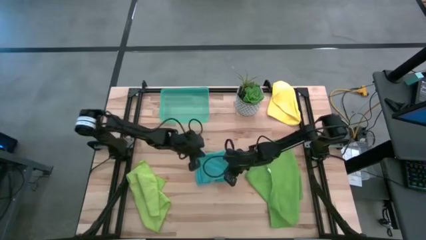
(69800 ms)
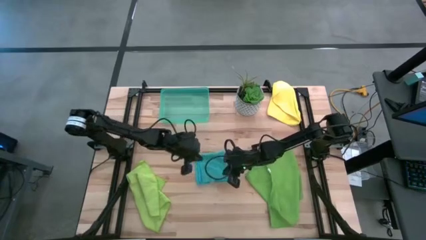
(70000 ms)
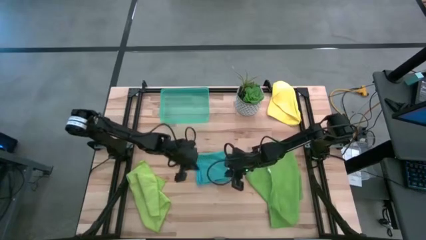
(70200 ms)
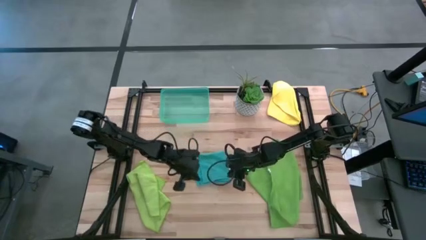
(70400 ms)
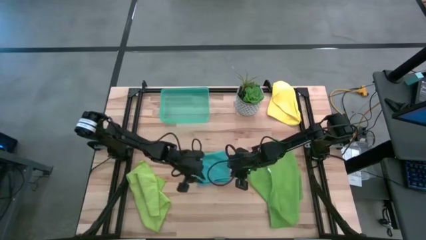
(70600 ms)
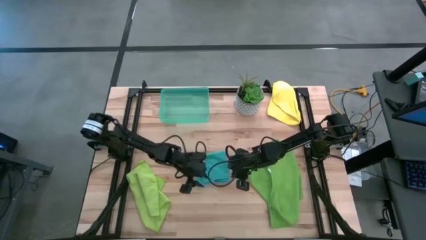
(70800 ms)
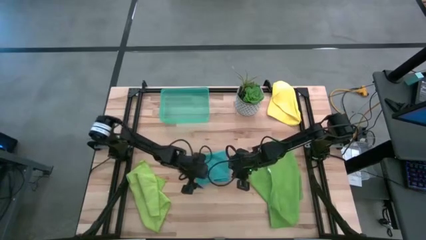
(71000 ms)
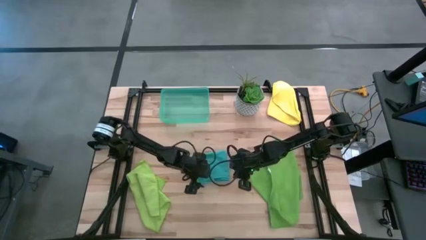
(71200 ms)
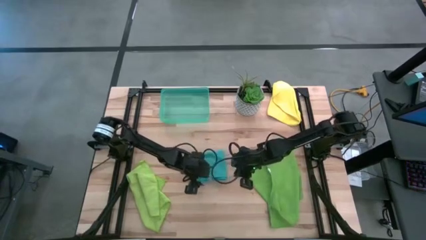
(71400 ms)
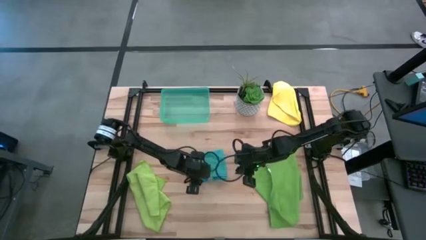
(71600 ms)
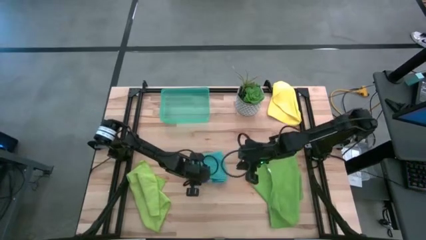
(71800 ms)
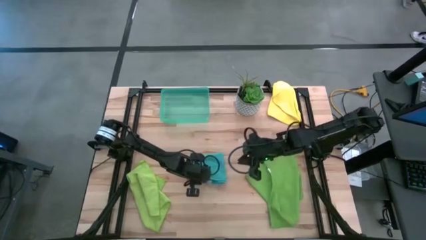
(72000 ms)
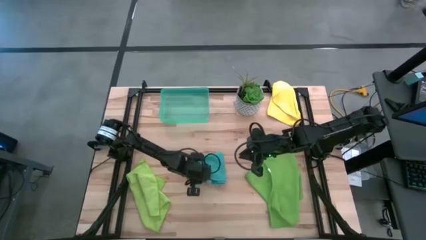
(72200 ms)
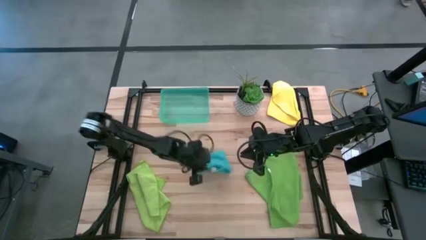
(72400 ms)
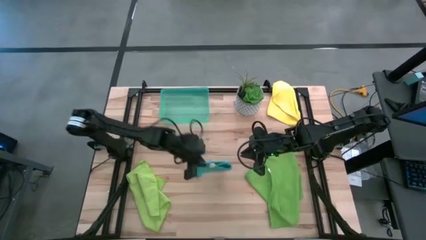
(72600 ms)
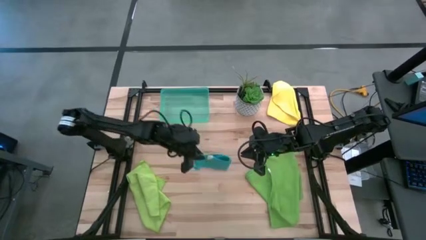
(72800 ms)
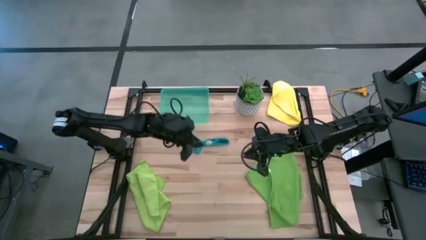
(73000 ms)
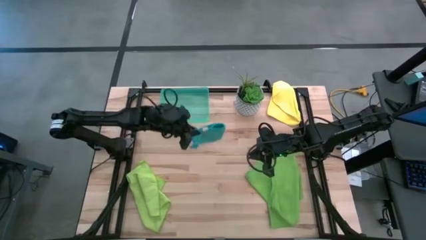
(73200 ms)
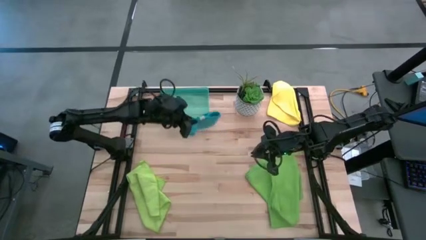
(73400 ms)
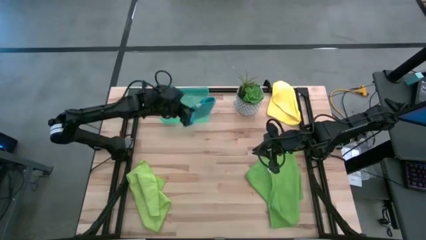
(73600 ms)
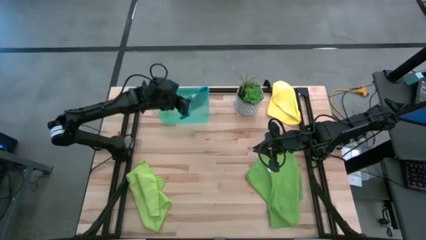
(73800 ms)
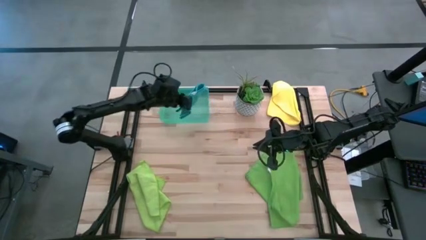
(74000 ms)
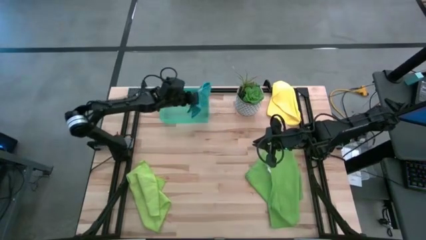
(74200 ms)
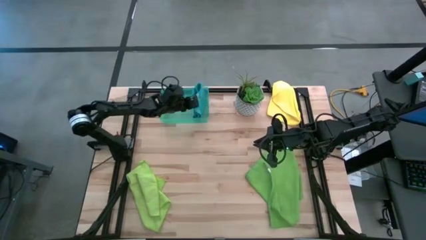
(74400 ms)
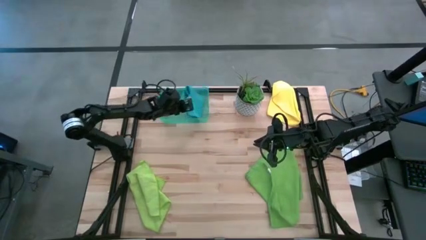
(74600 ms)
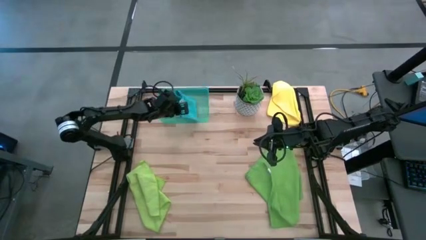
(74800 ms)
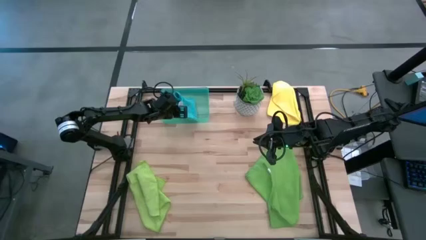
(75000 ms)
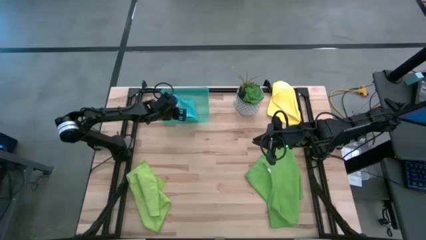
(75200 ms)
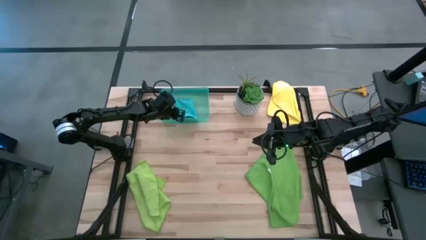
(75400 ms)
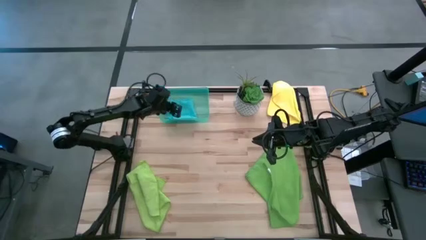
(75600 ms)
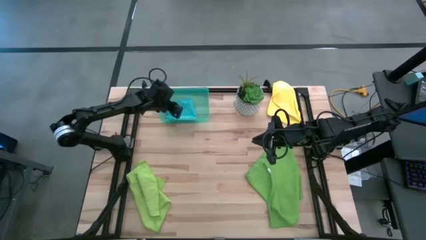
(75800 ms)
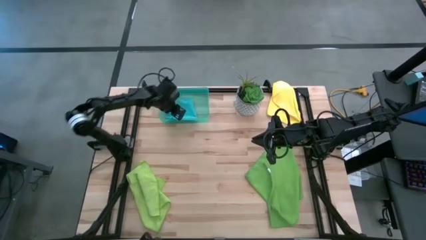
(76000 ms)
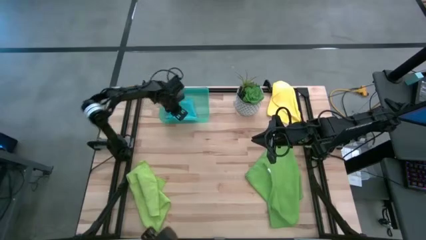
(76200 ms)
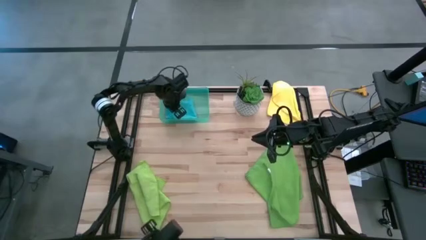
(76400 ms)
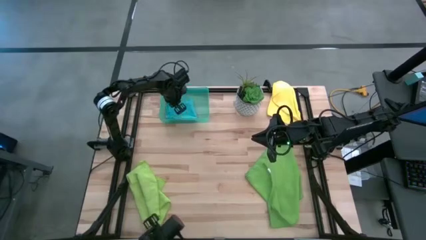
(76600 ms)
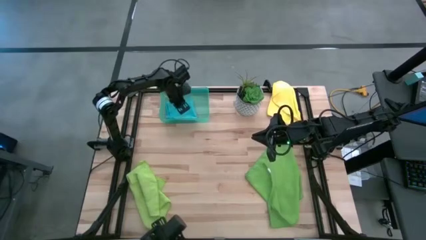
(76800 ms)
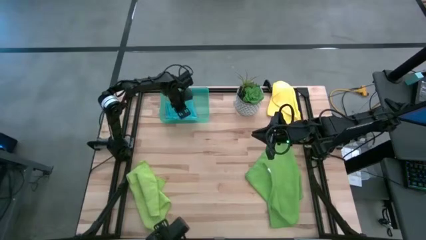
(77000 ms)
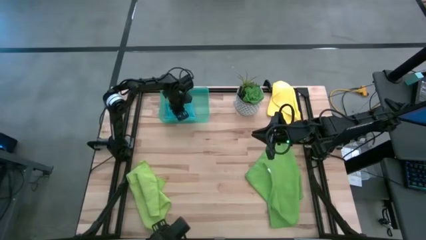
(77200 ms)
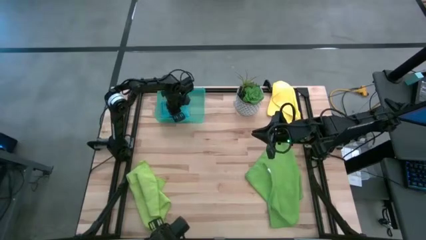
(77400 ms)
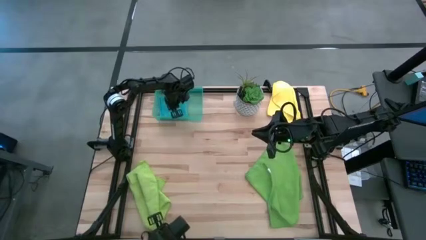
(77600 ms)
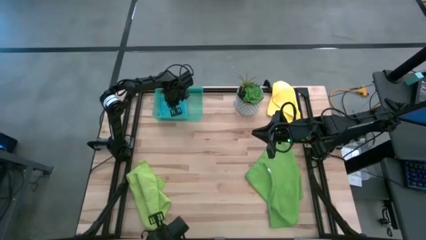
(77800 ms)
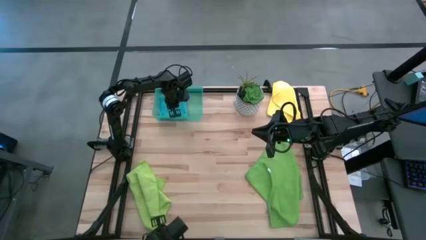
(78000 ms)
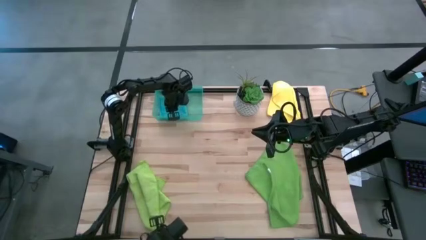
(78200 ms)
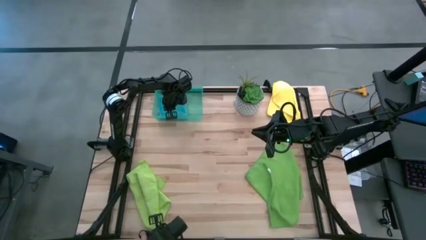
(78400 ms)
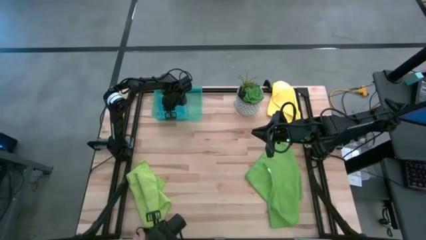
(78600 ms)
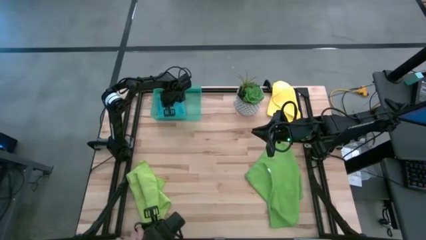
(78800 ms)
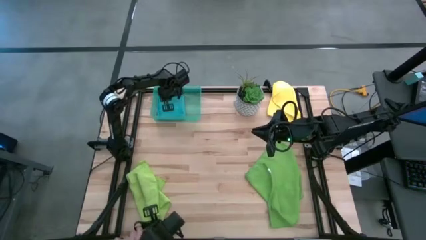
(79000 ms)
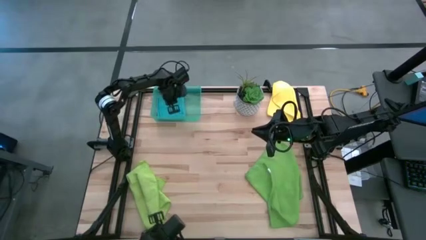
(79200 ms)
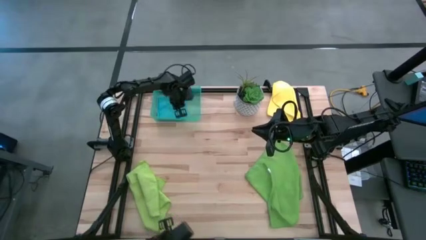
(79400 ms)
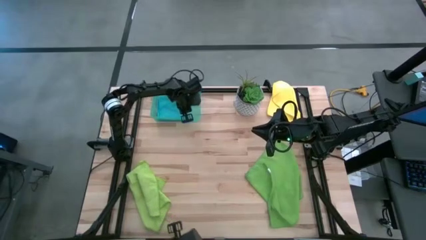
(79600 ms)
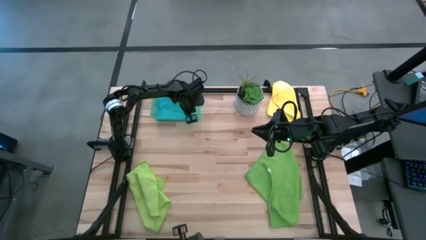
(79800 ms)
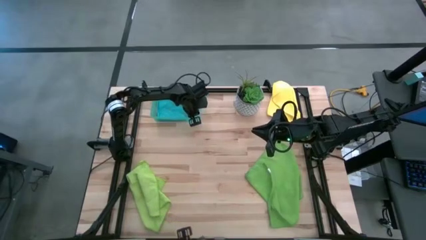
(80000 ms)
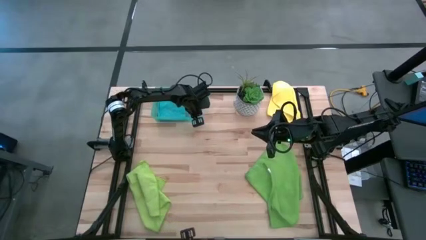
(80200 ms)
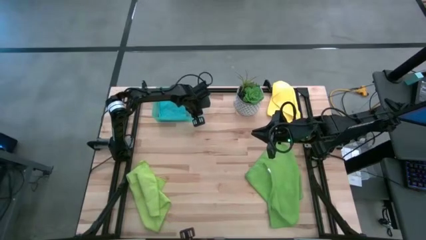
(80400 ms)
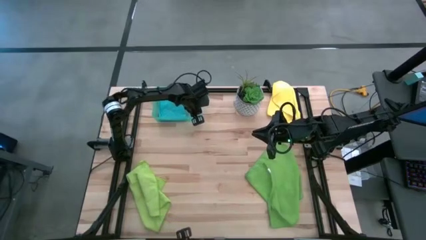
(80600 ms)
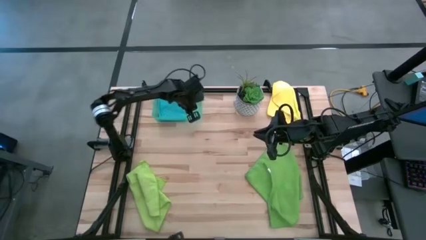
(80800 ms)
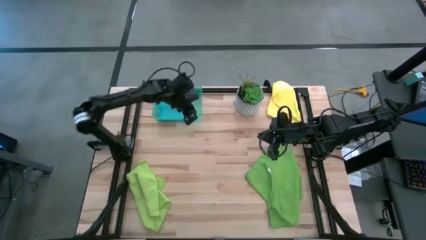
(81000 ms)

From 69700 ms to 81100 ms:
Task: Fold microfiber towels
Put the blue microfiber cloth into the blue bin

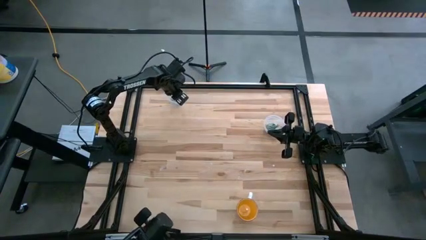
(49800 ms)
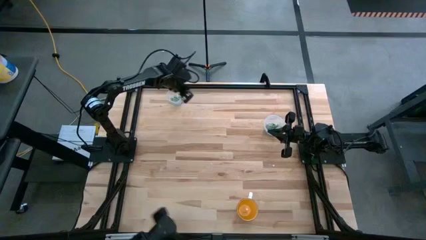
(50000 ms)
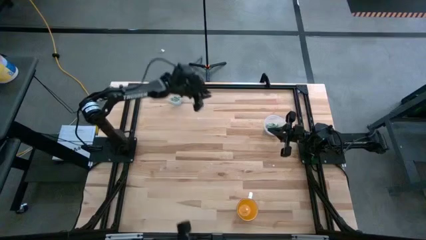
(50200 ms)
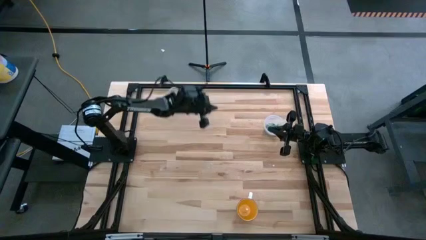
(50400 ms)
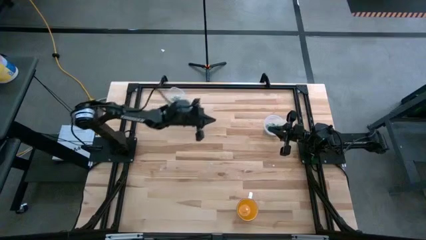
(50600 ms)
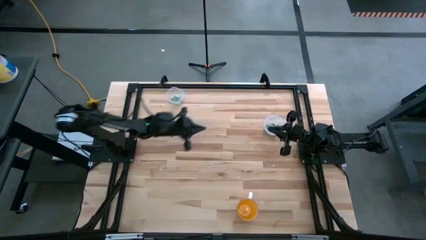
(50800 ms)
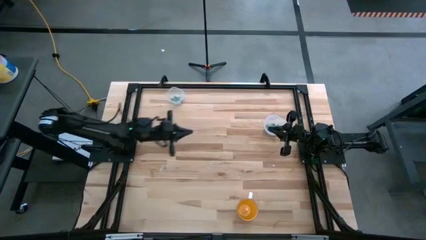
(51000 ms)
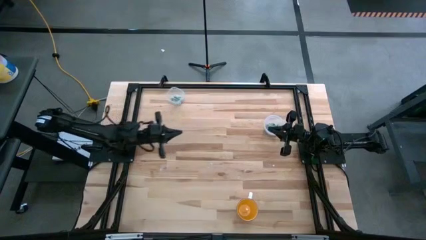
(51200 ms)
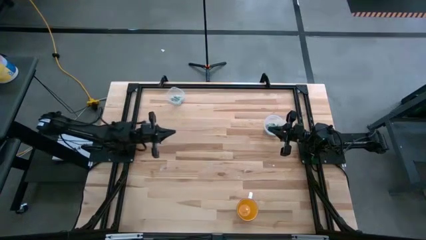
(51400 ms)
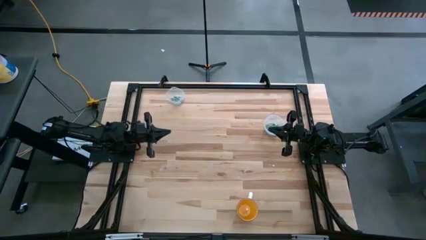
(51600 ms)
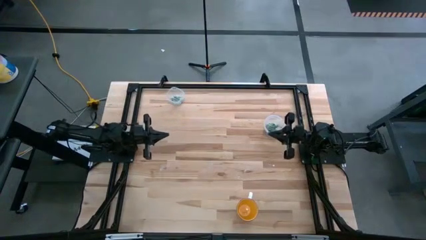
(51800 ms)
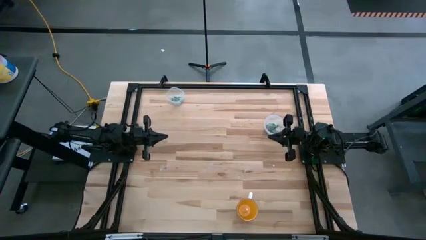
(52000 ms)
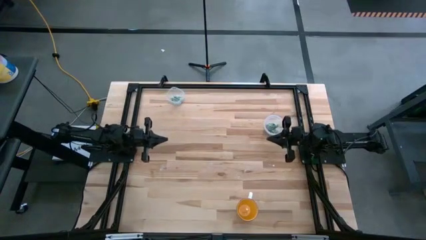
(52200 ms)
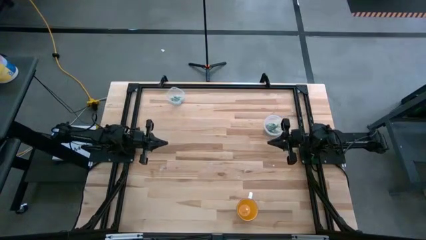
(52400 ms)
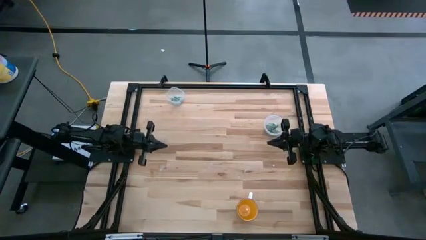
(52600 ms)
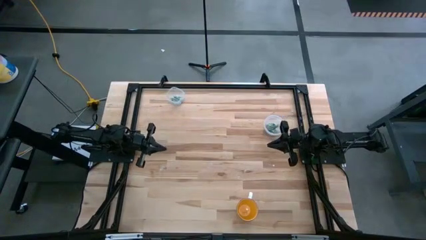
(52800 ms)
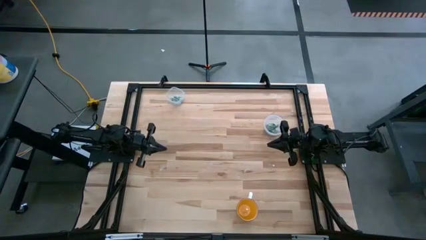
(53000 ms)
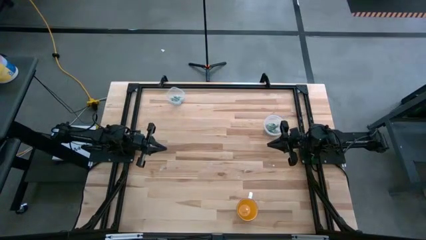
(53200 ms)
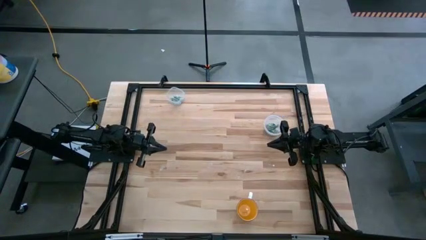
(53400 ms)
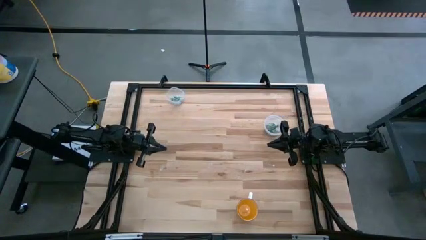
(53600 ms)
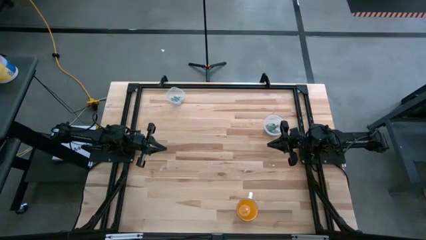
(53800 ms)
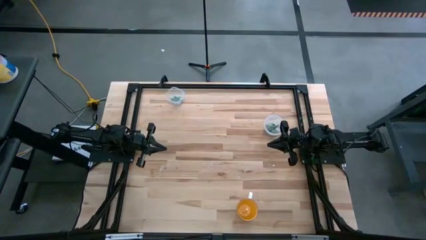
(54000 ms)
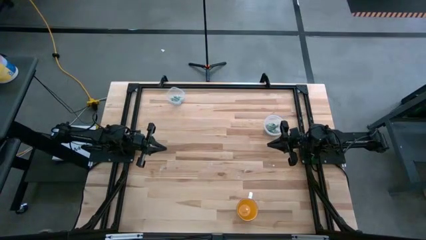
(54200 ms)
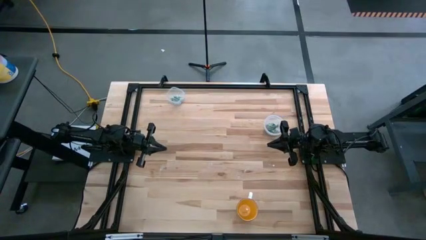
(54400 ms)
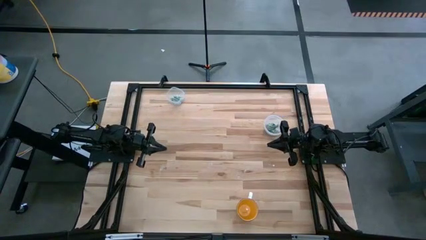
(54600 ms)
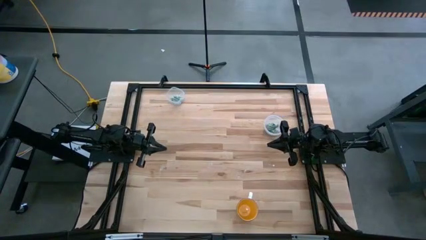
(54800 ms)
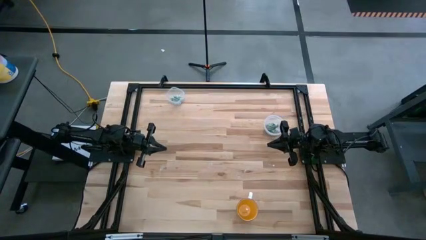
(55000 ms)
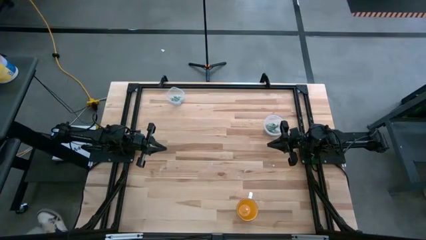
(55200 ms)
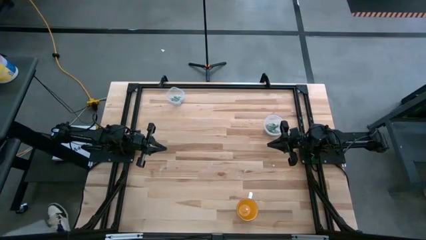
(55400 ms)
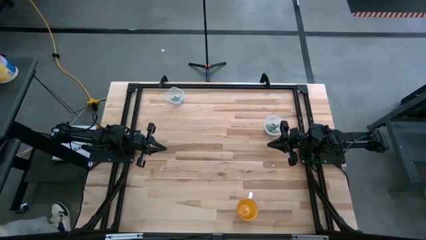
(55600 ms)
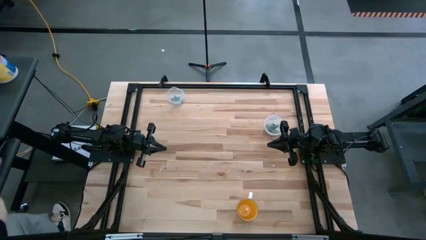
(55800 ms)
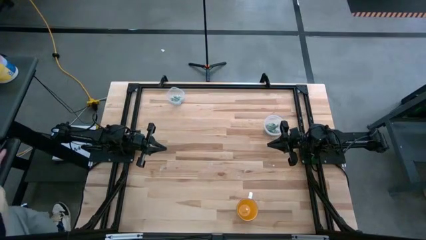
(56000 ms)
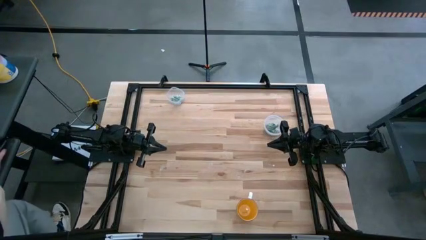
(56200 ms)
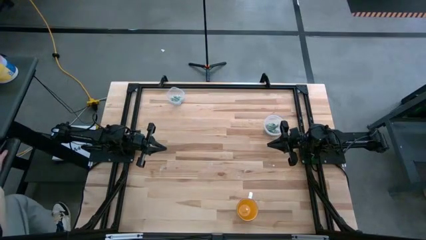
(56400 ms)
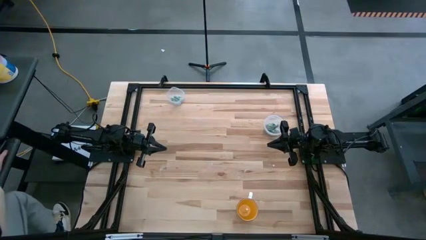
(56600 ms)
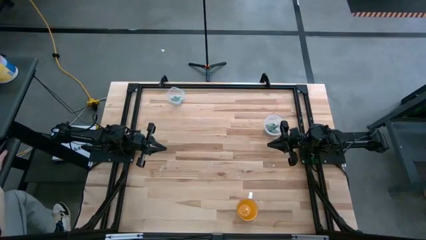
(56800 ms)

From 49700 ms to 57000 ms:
Task: Pick and place items into bin
Return to Home Position
